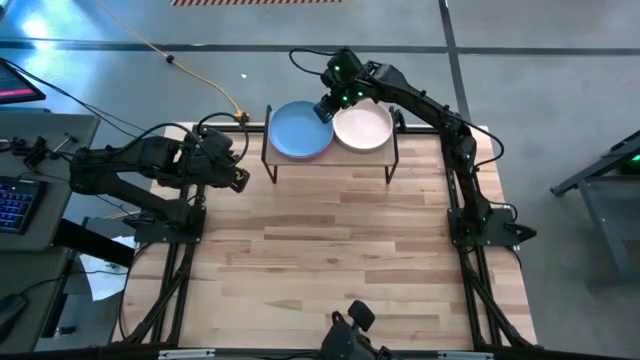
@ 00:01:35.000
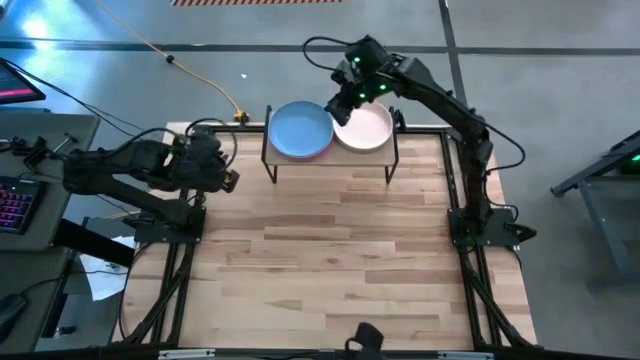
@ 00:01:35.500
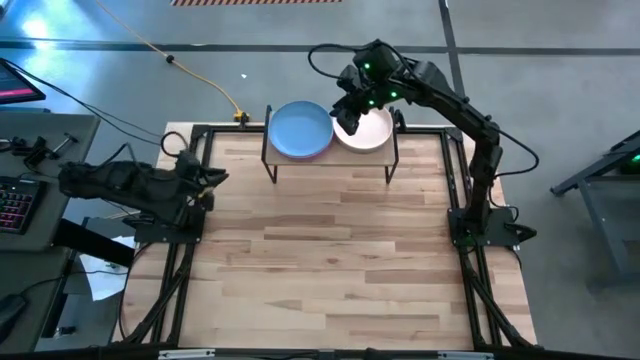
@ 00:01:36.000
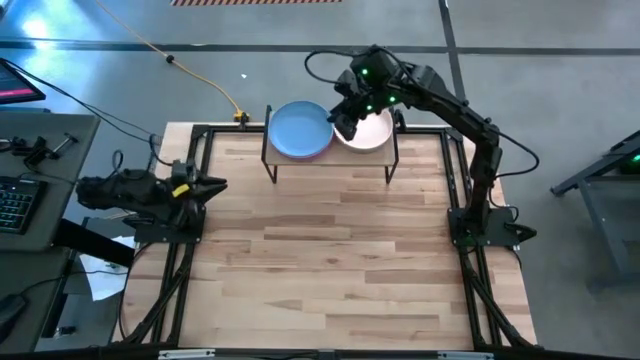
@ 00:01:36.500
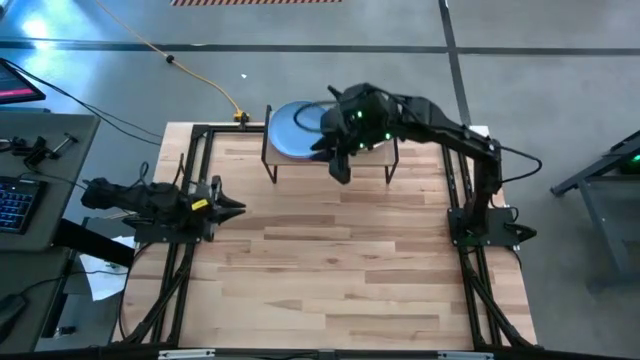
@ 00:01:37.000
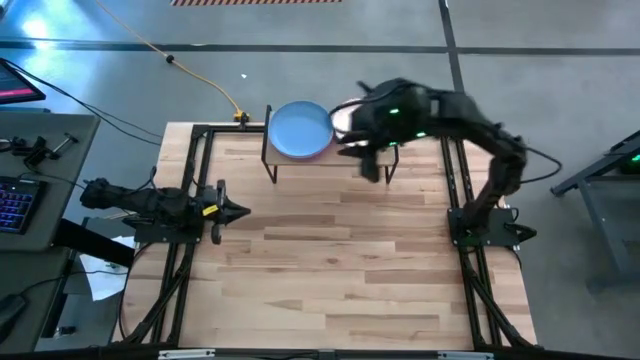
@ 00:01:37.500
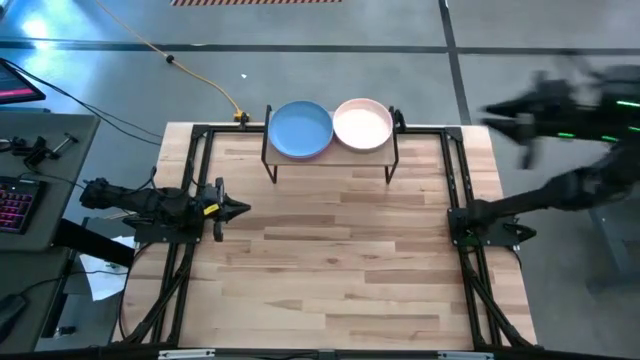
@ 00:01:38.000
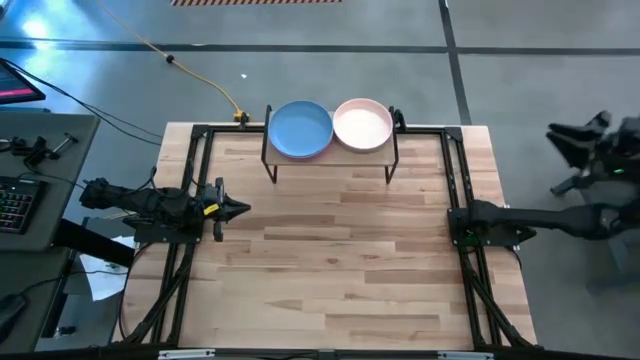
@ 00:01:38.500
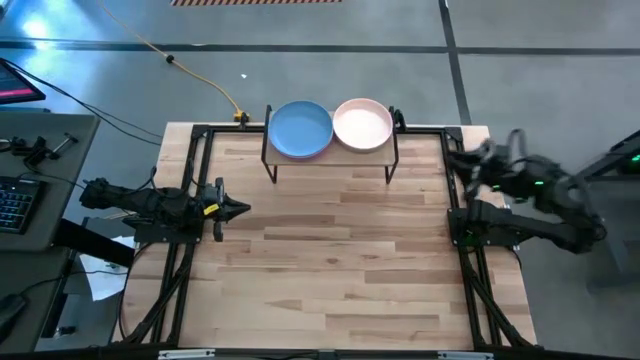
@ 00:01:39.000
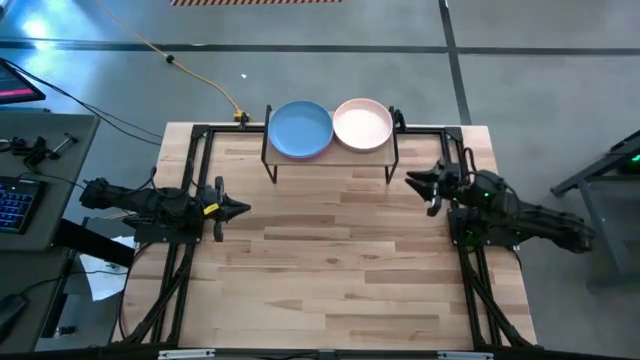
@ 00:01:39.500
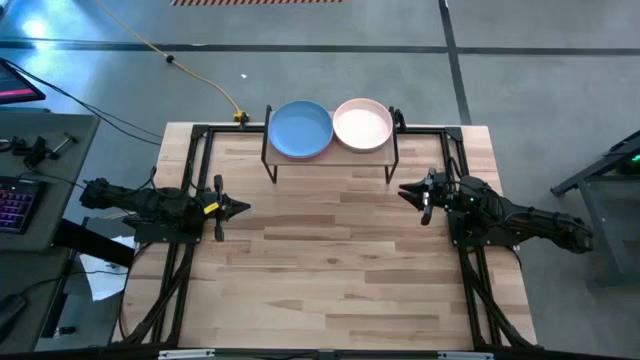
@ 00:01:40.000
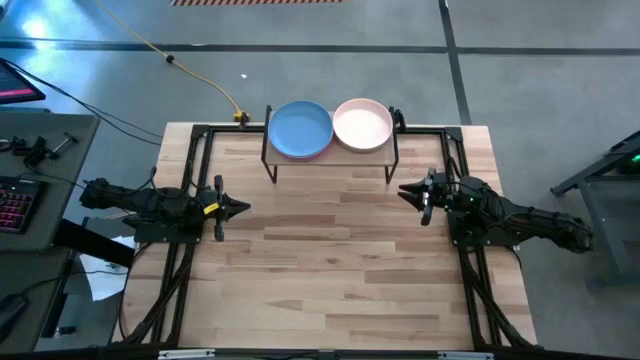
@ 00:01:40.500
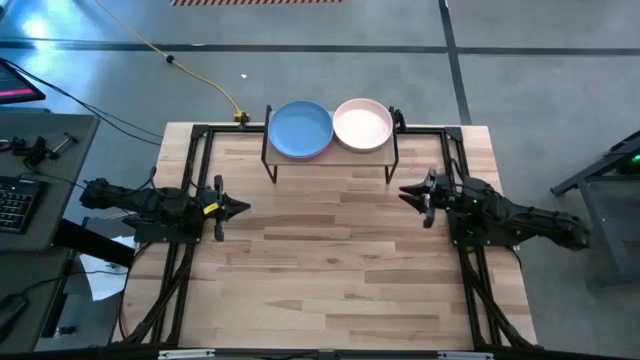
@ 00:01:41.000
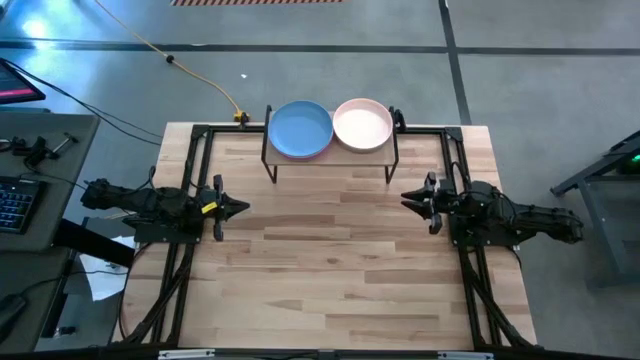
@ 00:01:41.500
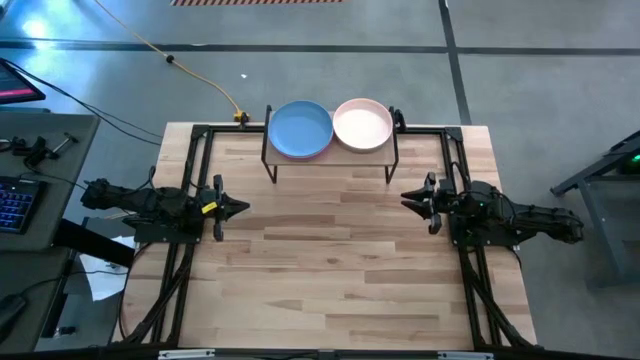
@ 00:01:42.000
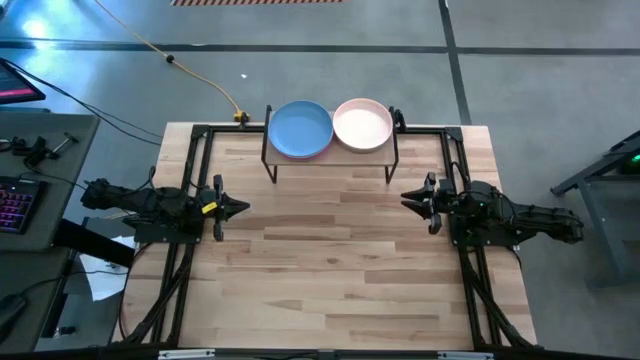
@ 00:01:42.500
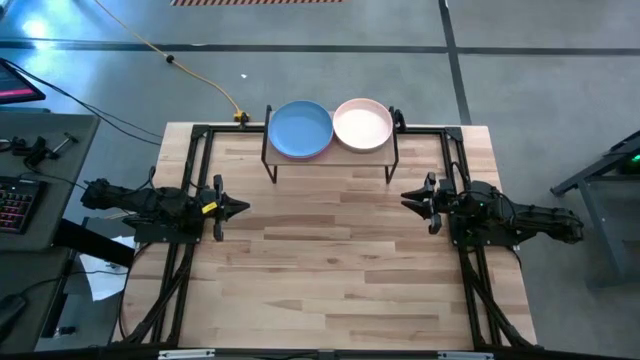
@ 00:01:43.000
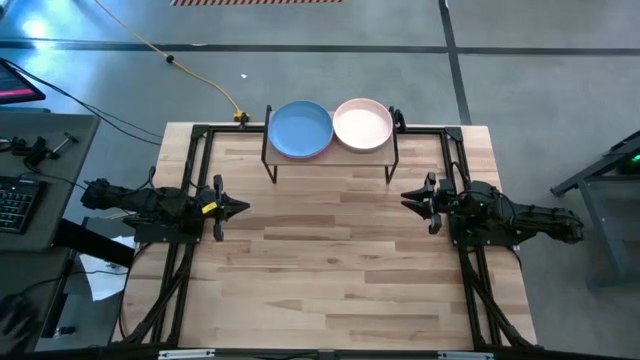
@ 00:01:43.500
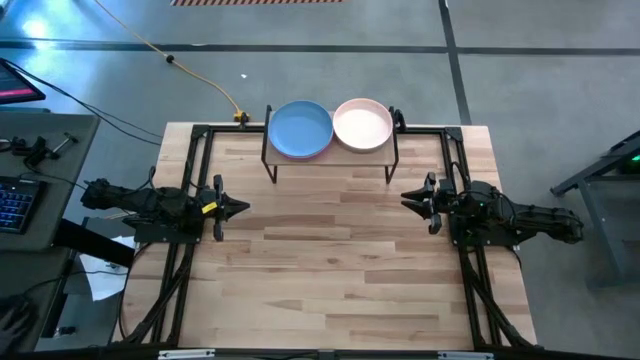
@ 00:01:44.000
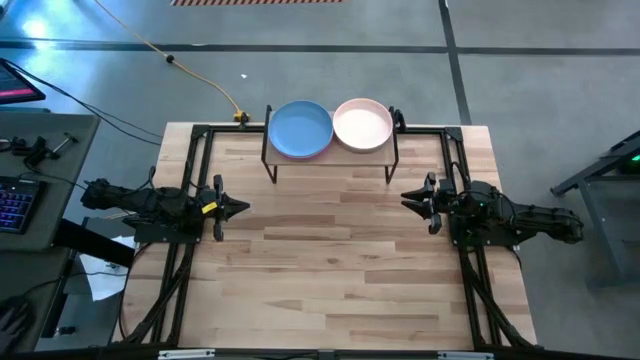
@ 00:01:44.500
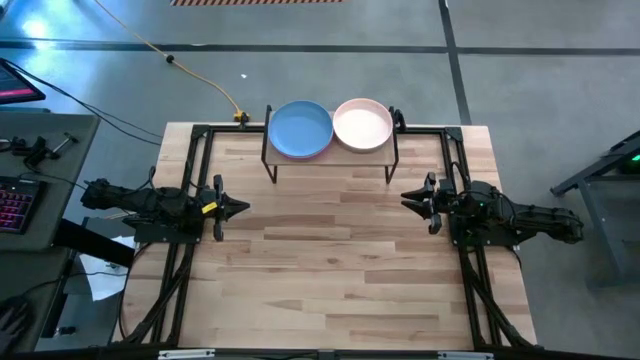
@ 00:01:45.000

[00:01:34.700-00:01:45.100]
Task: Place and stack plates onto a shelf
Return to Home Position

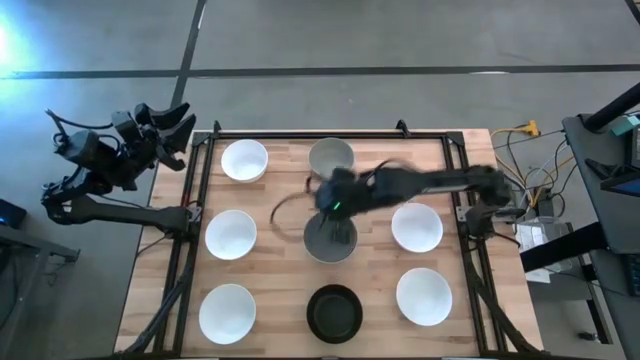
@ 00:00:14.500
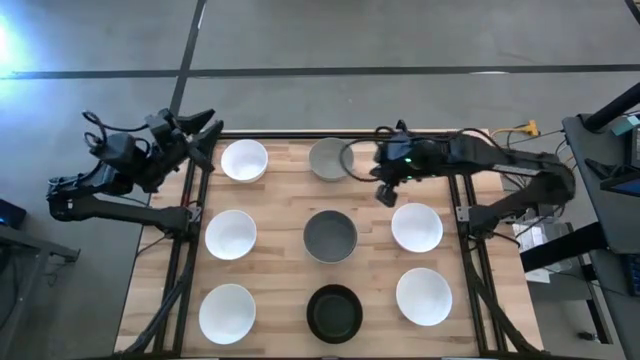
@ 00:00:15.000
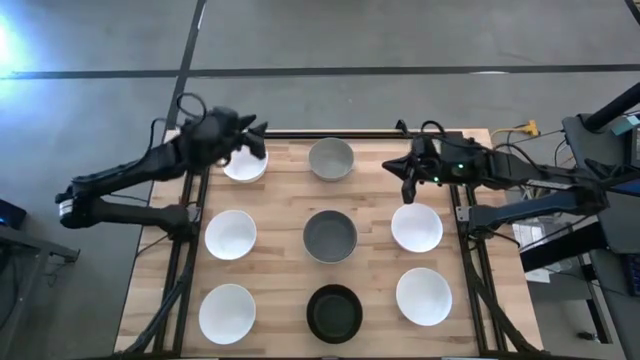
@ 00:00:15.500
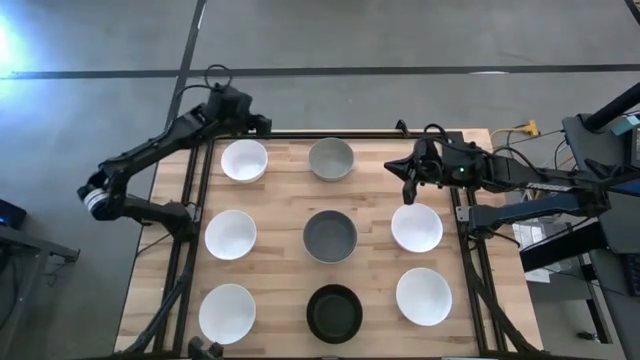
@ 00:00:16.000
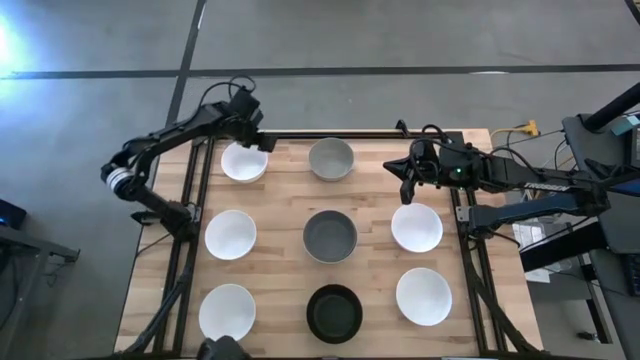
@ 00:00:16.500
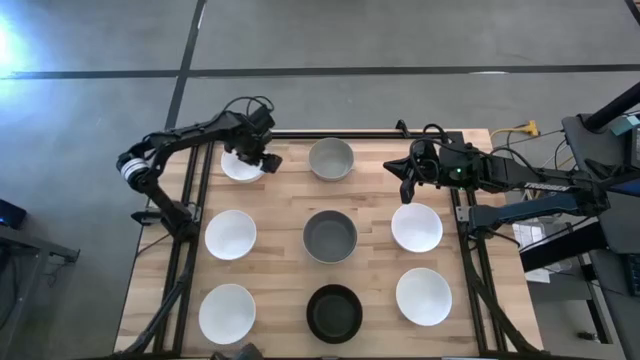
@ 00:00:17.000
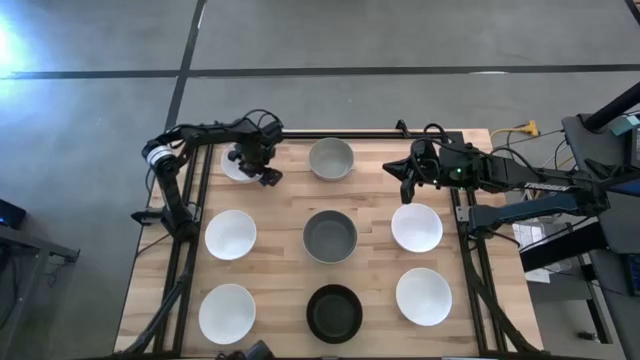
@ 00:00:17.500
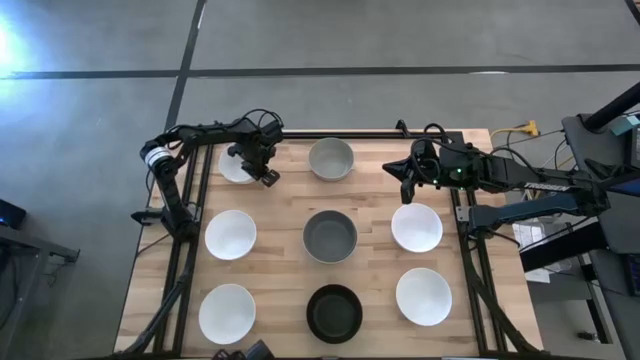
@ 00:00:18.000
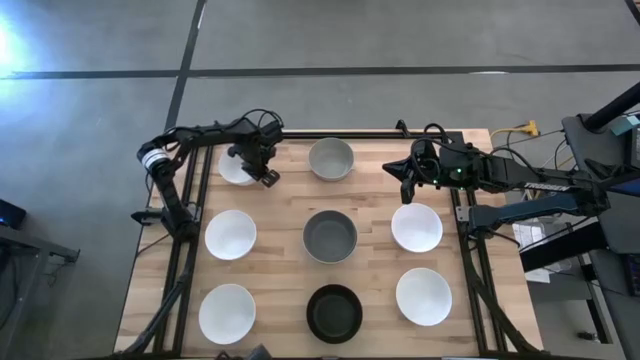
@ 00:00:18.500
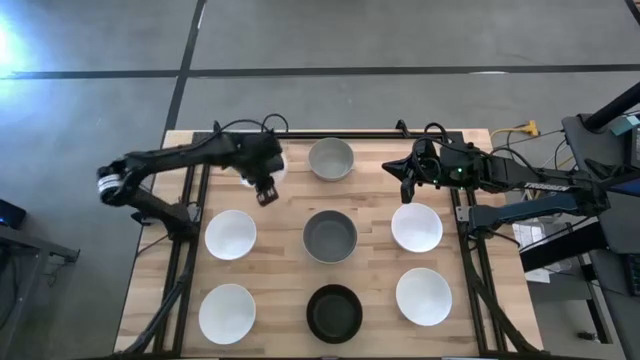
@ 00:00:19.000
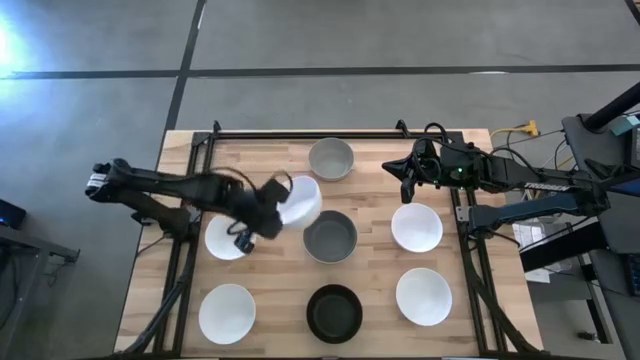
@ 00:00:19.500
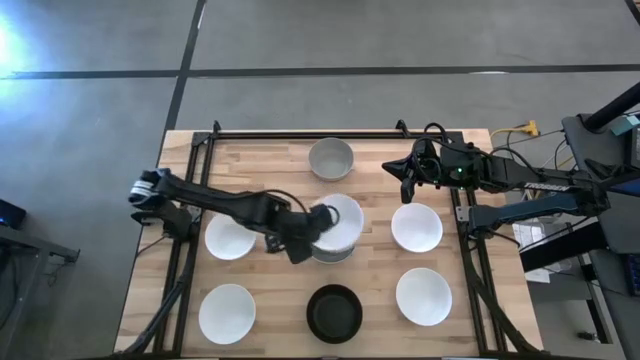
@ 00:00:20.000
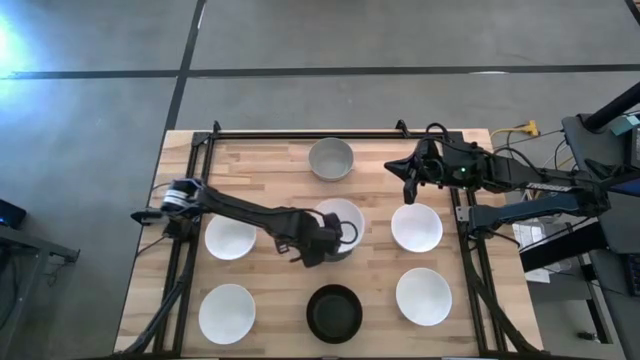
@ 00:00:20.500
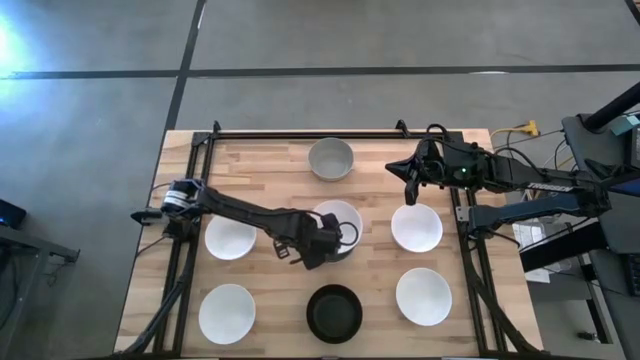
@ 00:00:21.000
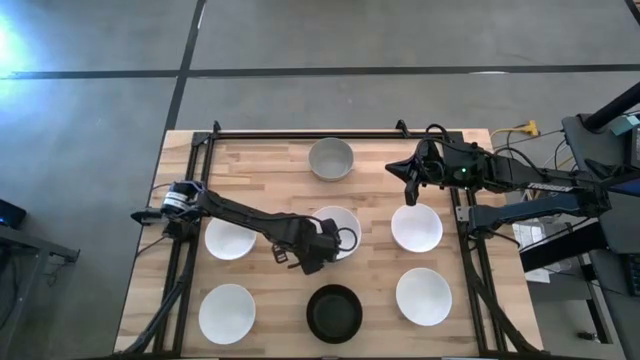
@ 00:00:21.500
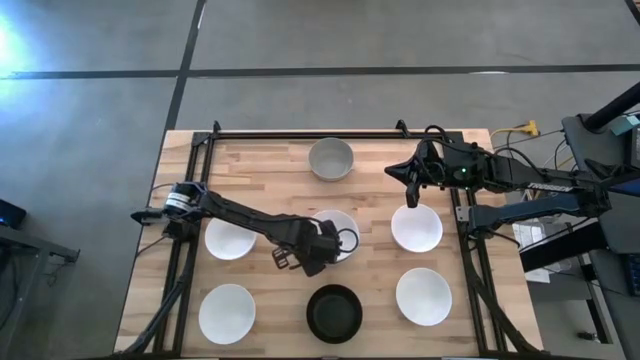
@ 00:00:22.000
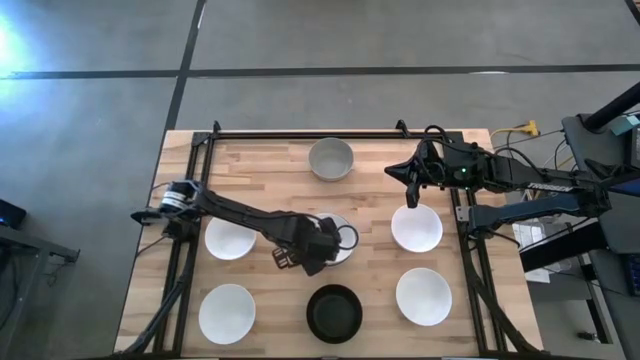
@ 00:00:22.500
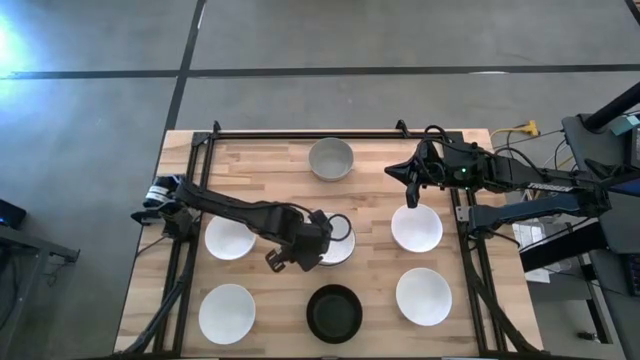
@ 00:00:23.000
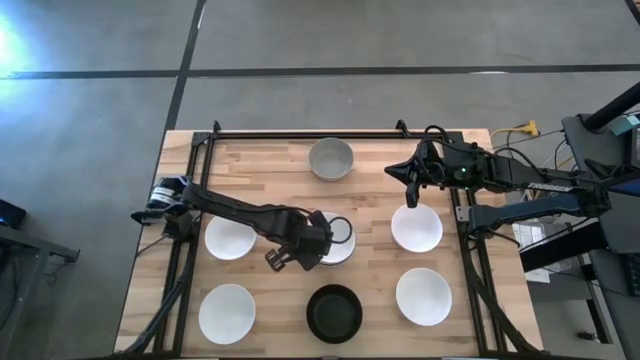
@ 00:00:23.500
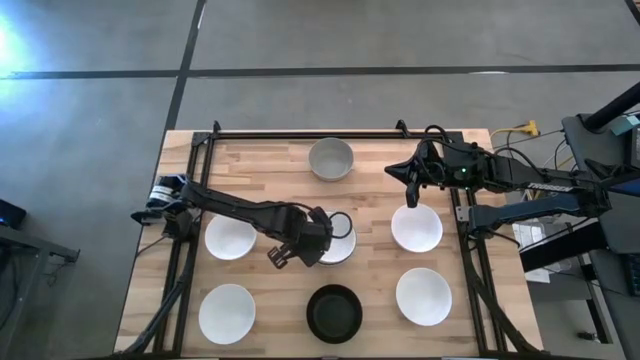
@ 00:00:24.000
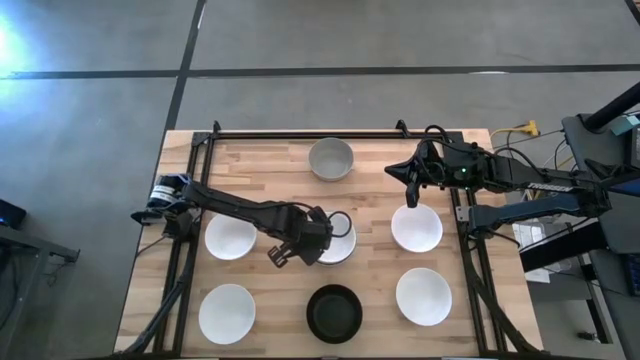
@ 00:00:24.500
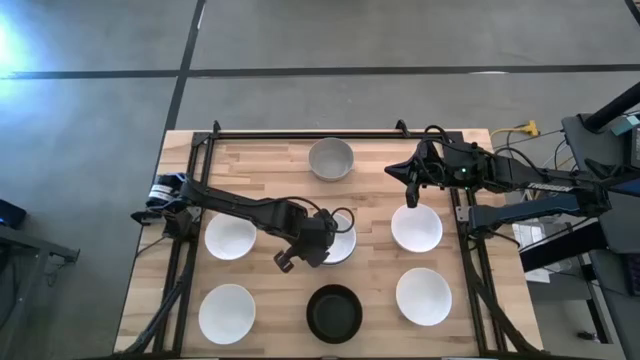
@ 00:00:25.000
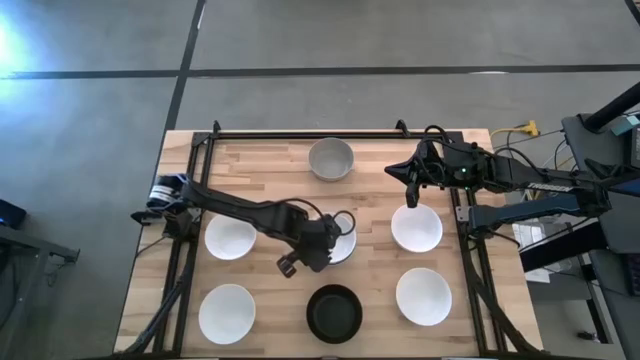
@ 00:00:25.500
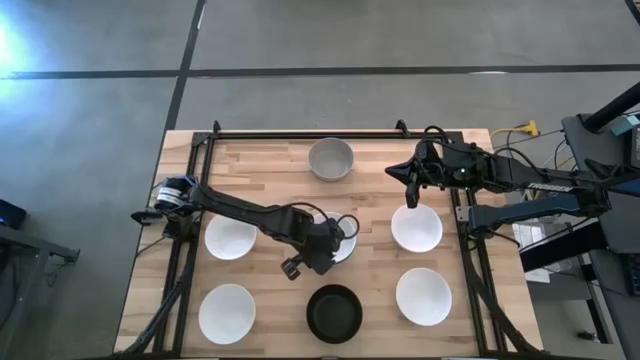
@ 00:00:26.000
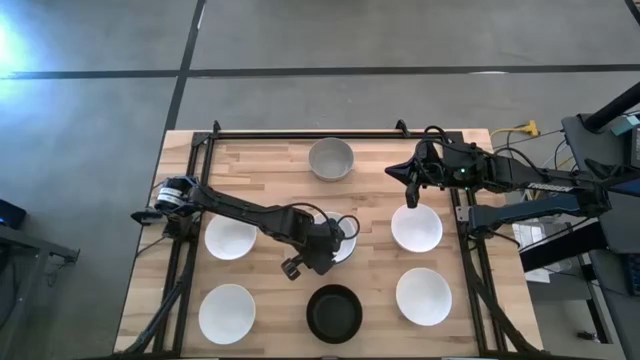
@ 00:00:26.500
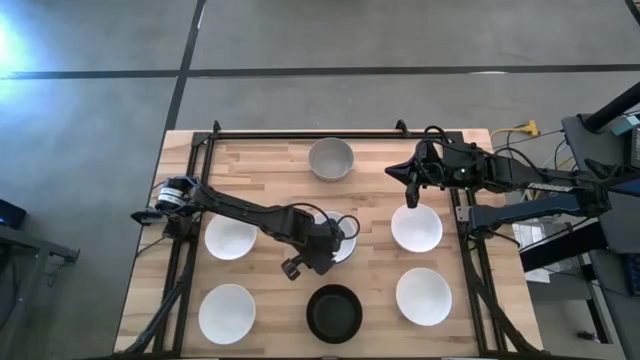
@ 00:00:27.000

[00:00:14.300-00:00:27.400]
Task: Nest bowls inside each other
Stack the white bowl on top of the dark gray bowl
